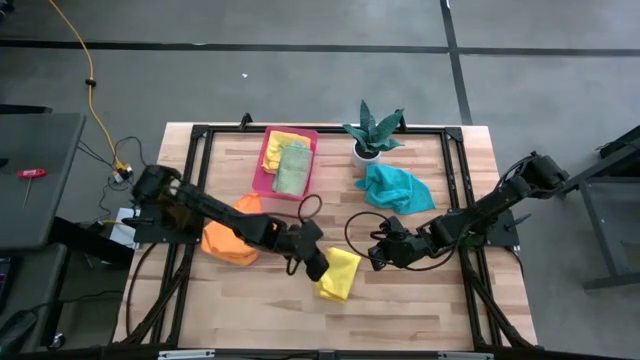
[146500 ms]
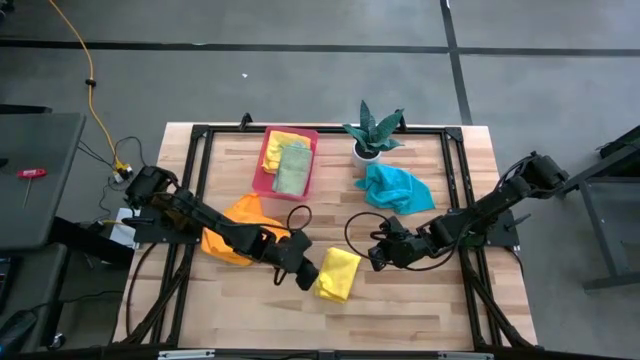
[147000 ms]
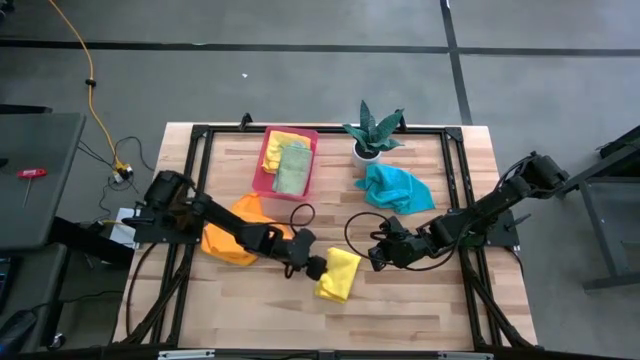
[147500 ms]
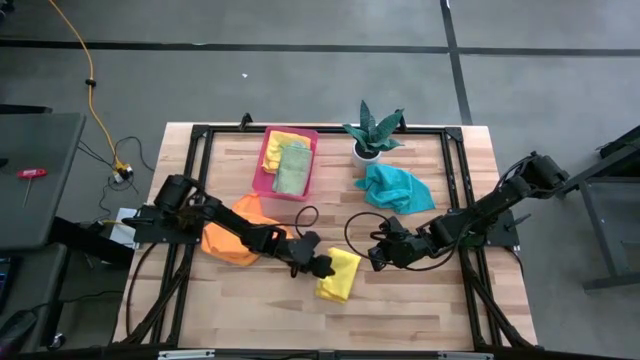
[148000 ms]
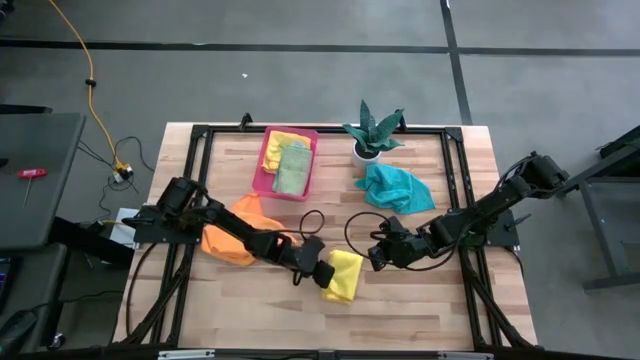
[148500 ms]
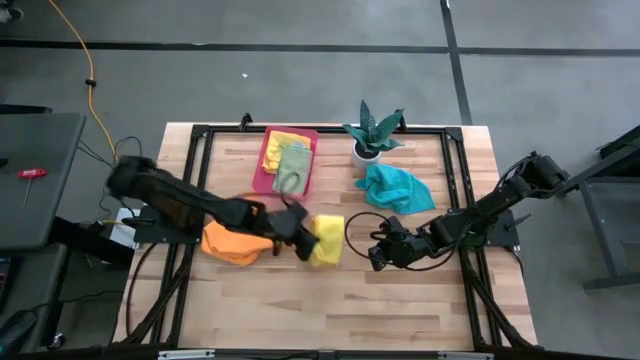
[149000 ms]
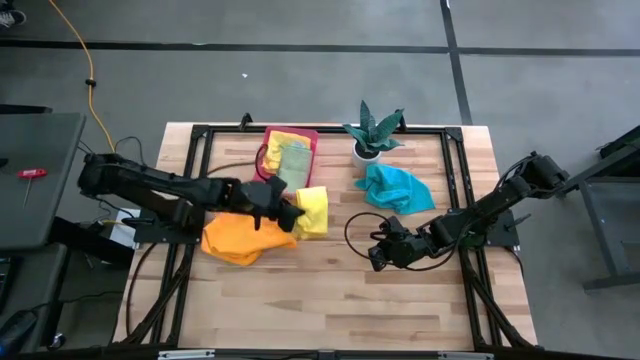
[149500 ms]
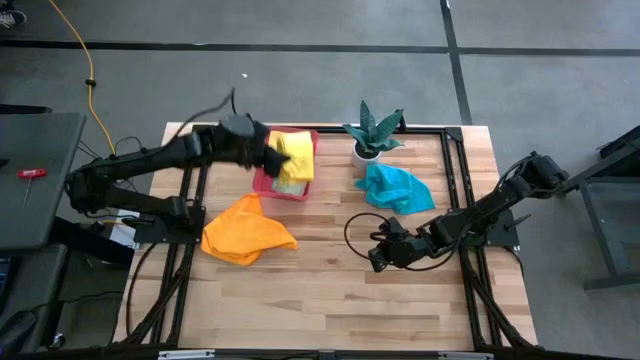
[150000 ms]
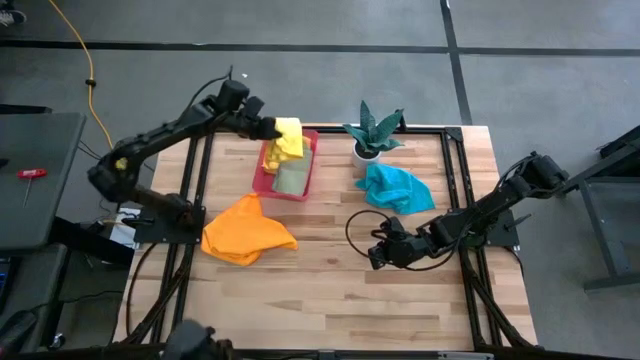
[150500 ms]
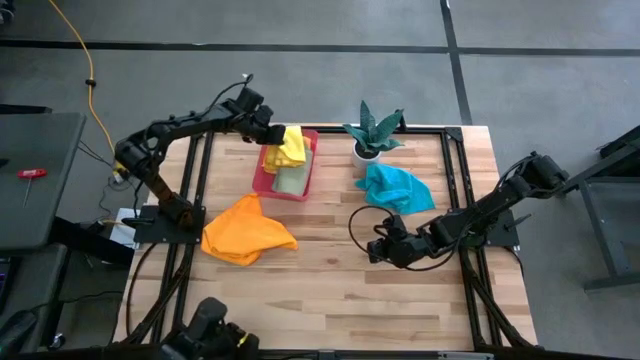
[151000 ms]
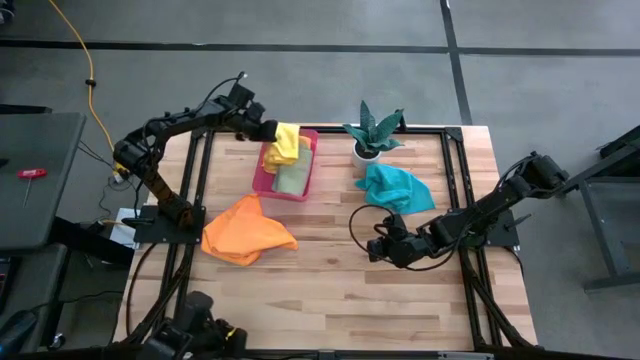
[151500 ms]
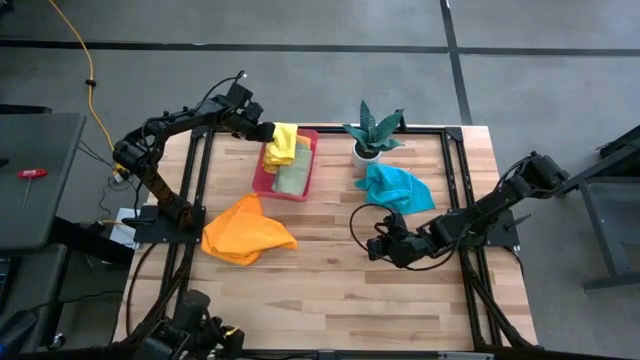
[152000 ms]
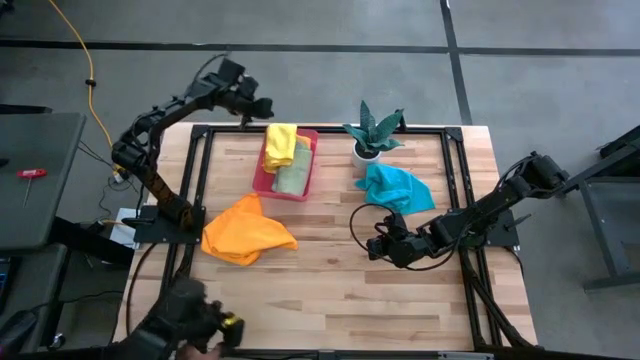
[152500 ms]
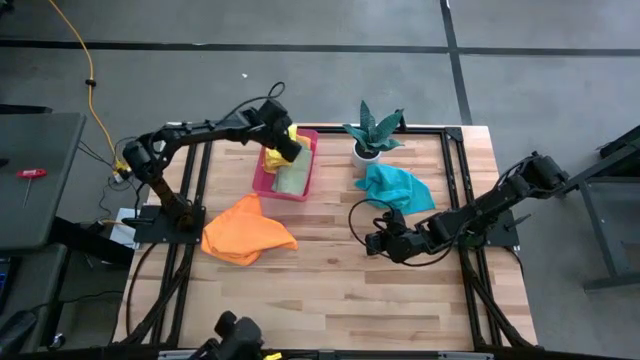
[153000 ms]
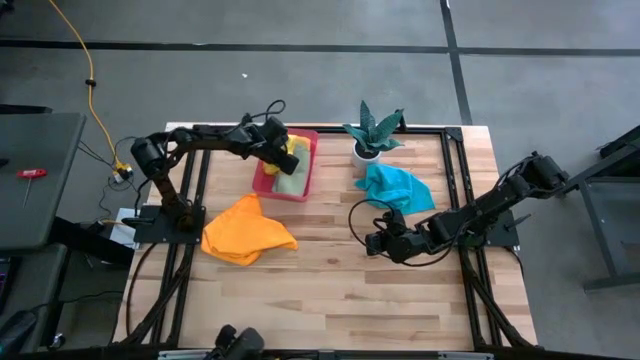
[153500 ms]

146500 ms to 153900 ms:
Task: Fold microfiber towels
Put the folded yellow microfiber cloth into the red bin

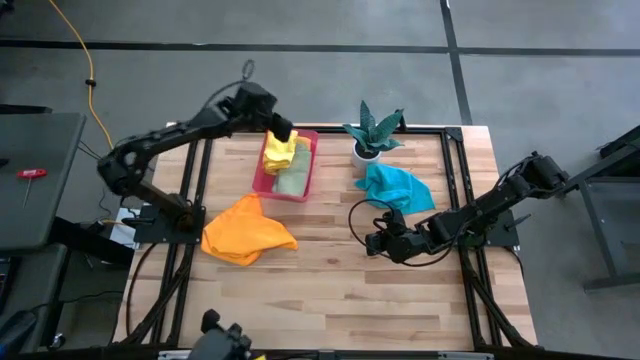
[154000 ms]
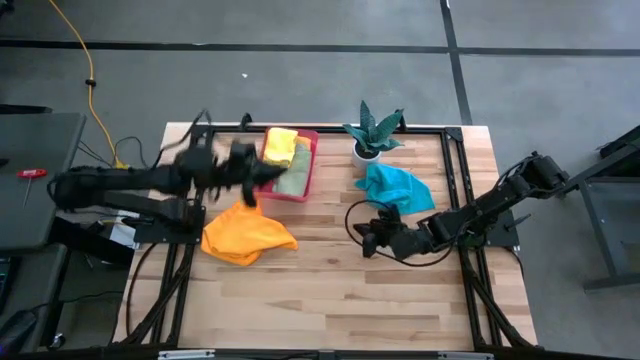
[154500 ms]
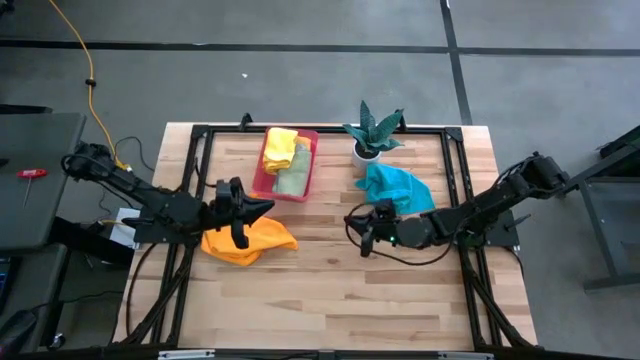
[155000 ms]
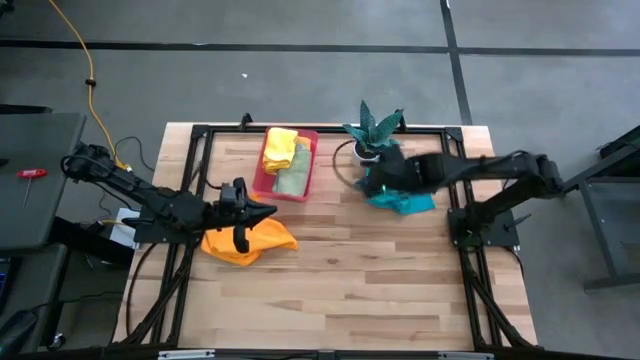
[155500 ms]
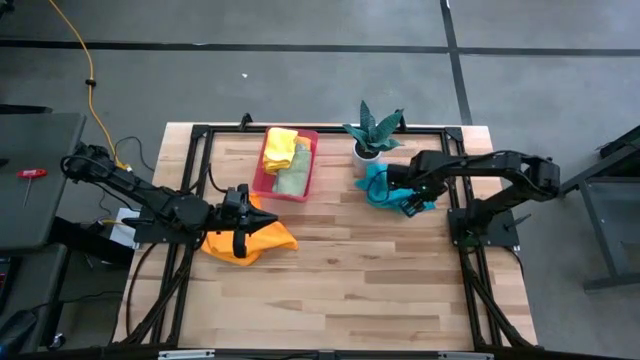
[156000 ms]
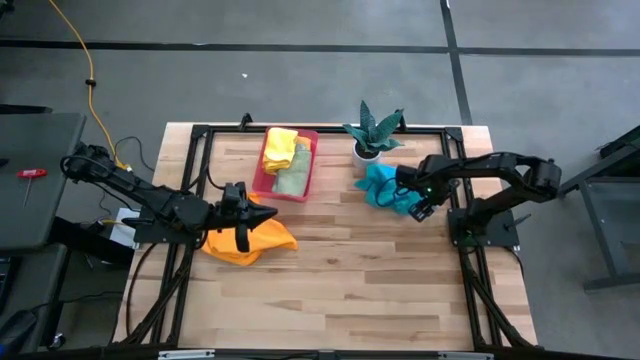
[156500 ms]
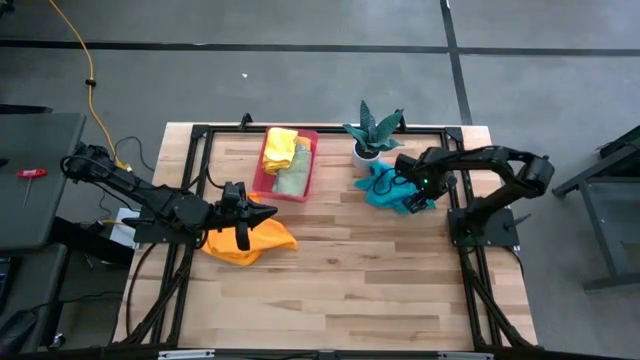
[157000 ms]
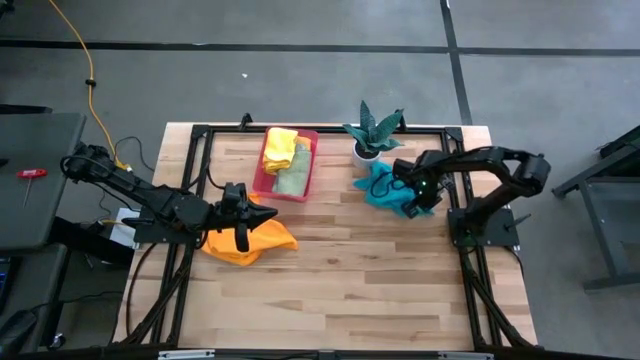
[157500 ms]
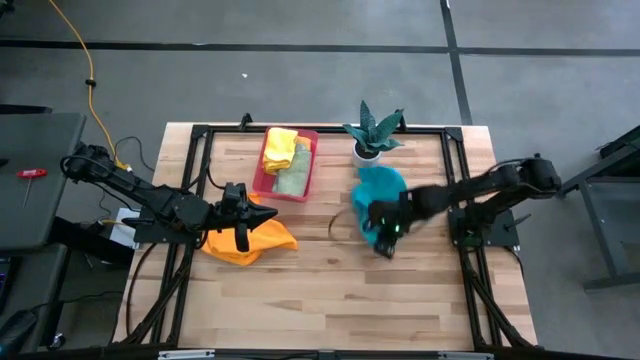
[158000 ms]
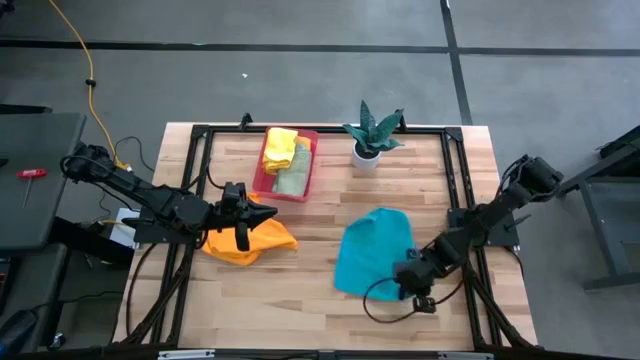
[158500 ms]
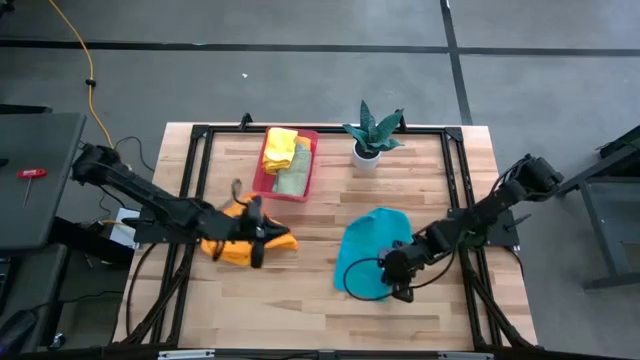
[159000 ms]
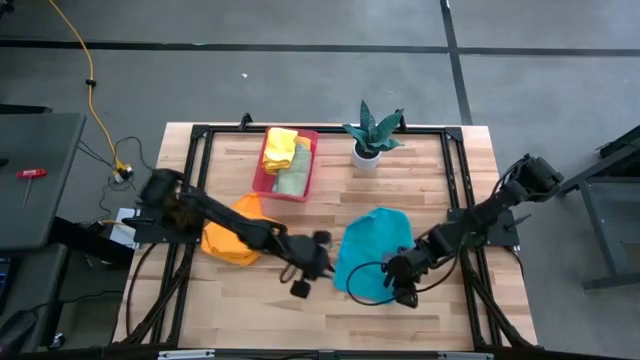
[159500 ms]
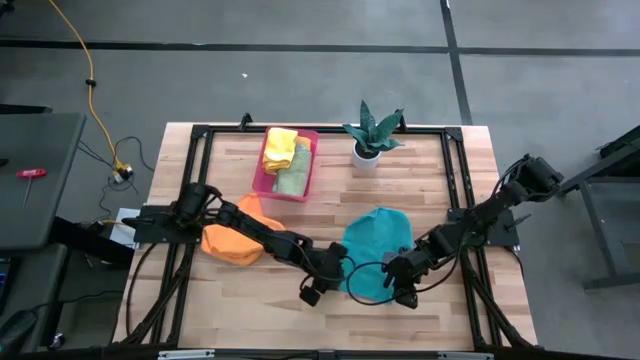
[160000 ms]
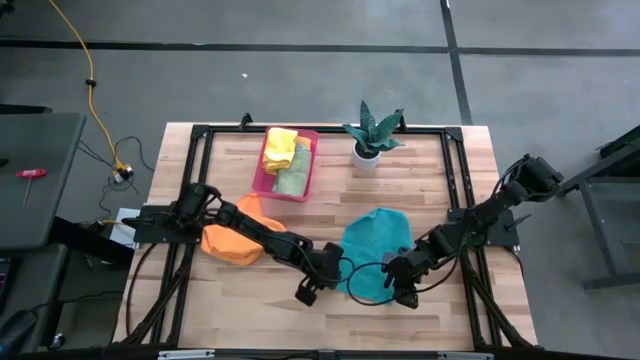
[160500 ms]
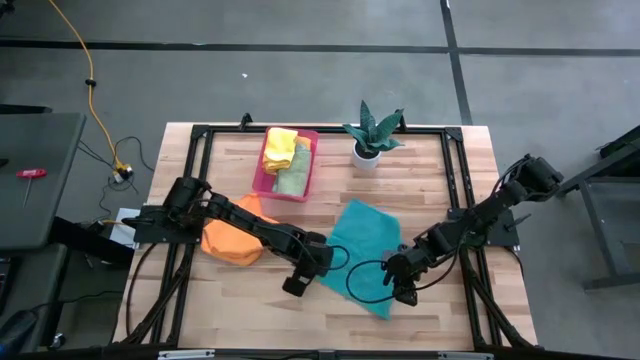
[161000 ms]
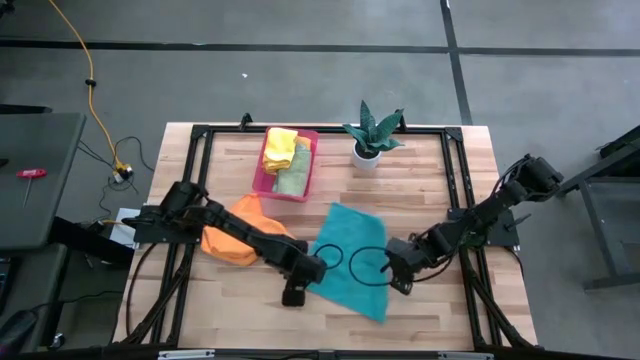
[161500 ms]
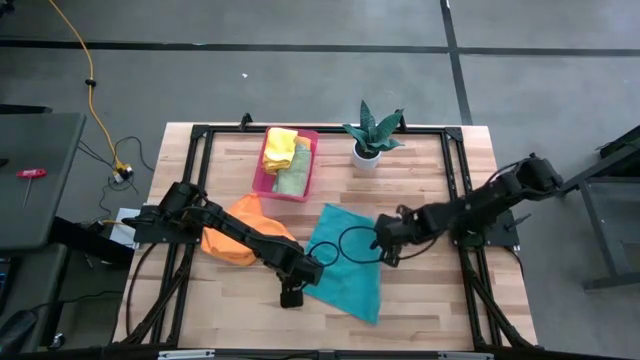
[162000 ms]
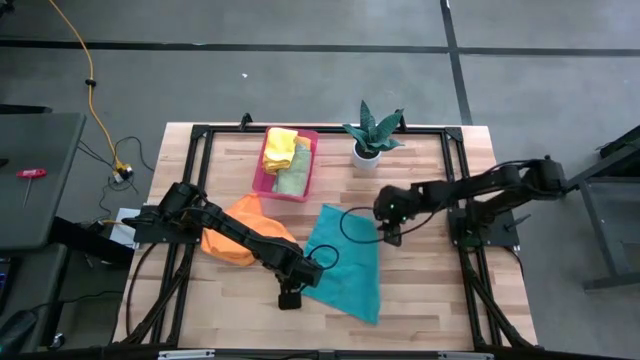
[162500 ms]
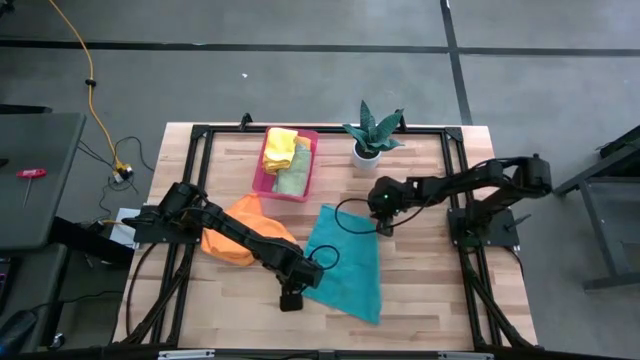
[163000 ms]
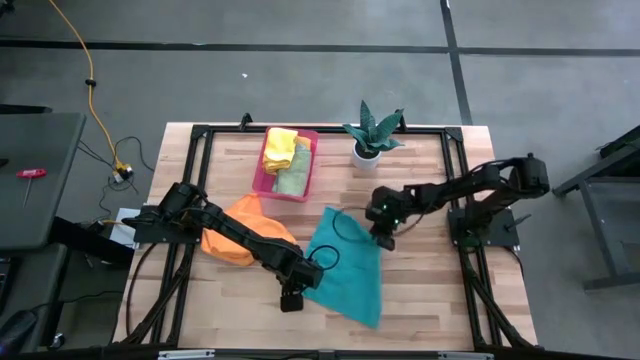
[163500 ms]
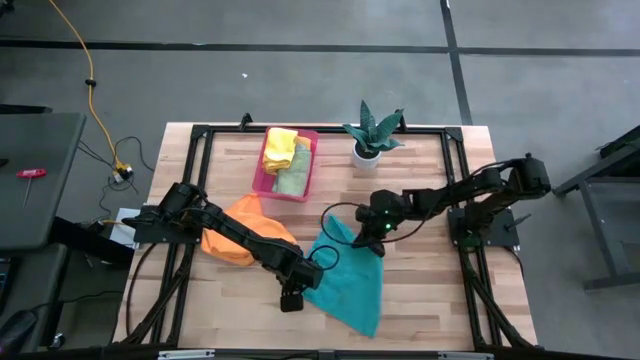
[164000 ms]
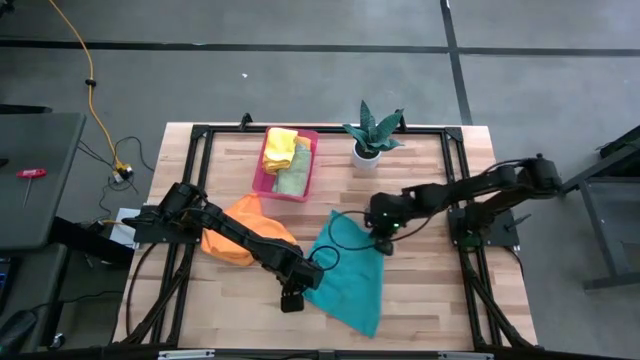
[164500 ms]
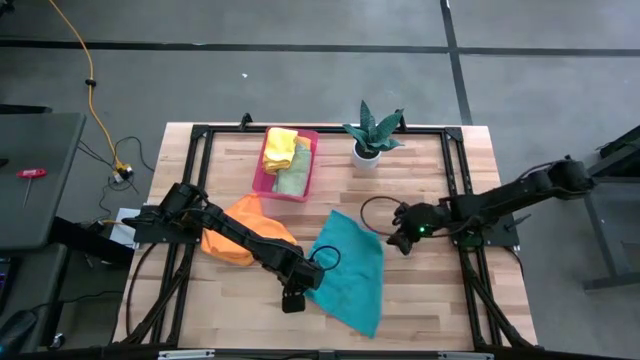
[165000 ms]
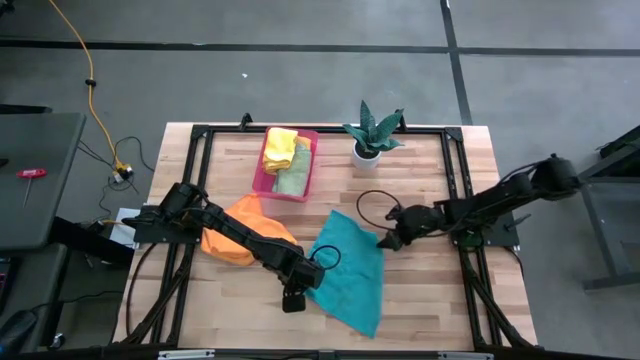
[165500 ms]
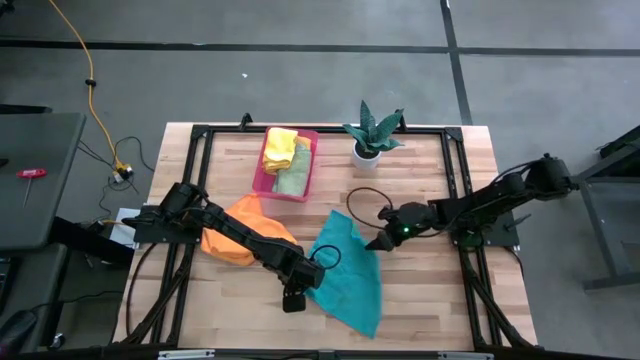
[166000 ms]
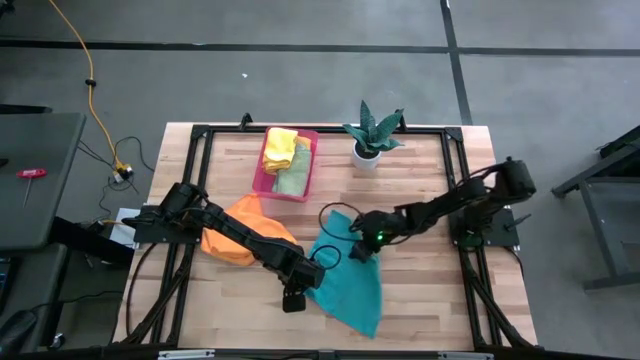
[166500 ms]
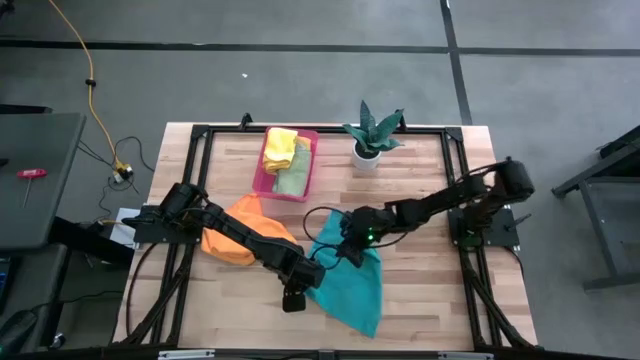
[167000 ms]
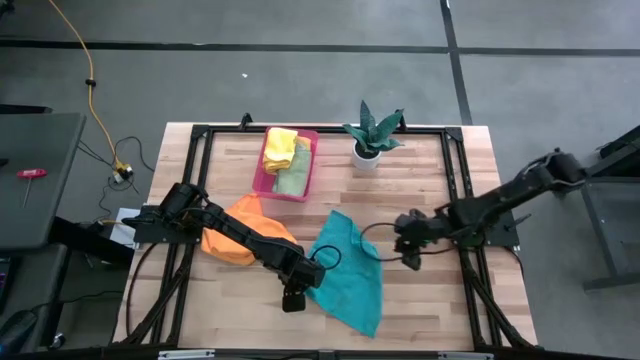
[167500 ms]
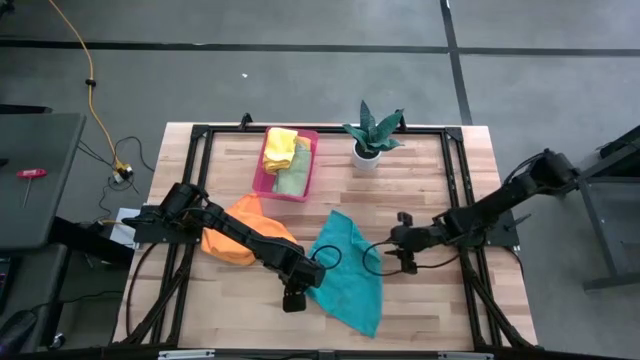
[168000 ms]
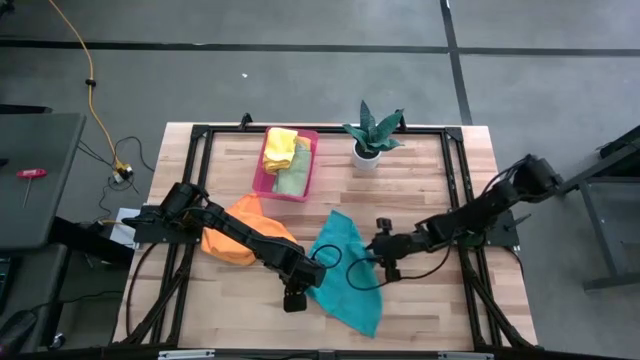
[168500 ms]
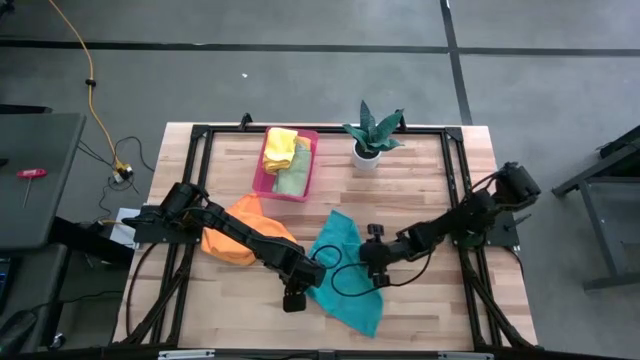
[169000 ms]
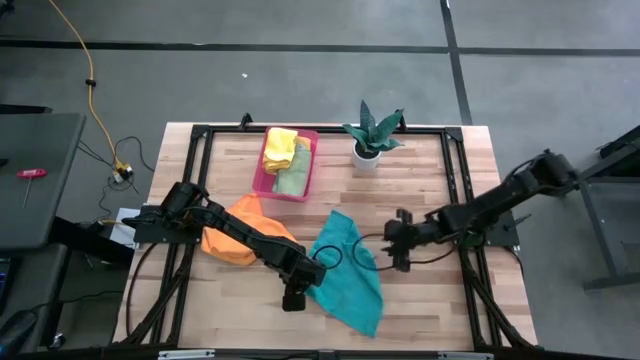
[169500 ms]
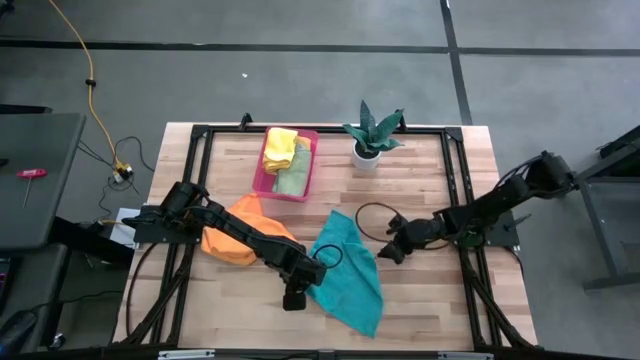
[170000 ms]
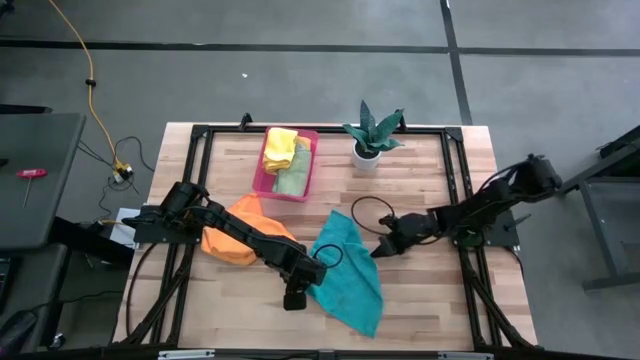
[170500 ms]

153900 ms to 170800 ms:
Fold the blue microfiber cloth
